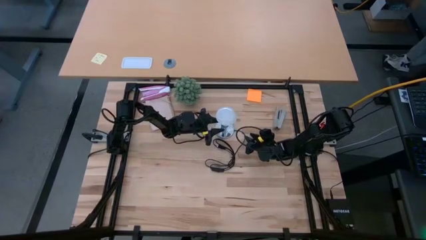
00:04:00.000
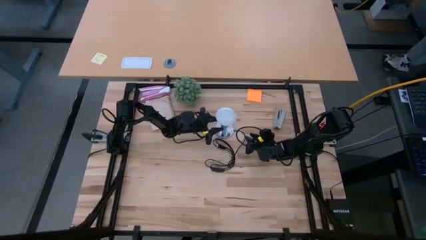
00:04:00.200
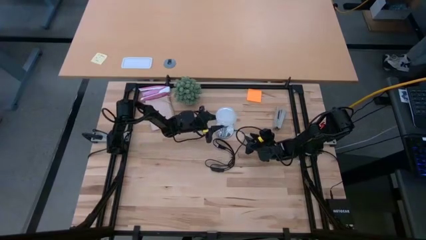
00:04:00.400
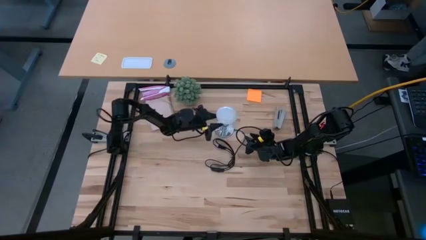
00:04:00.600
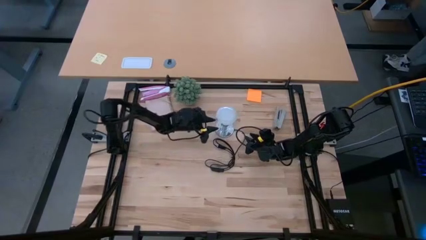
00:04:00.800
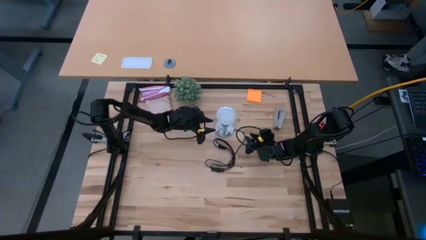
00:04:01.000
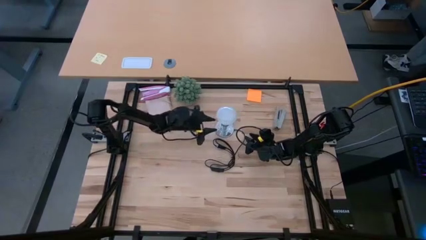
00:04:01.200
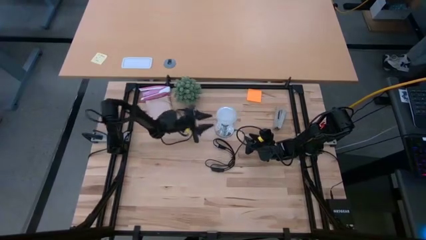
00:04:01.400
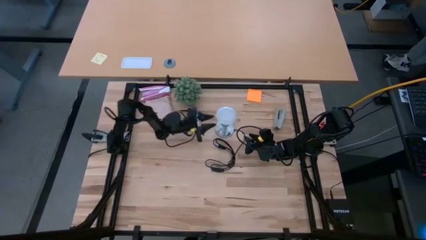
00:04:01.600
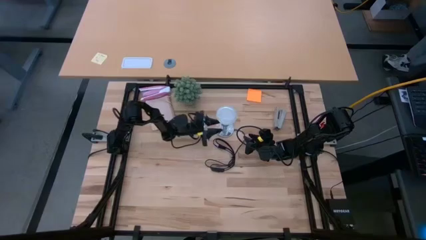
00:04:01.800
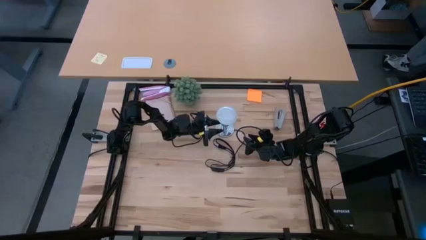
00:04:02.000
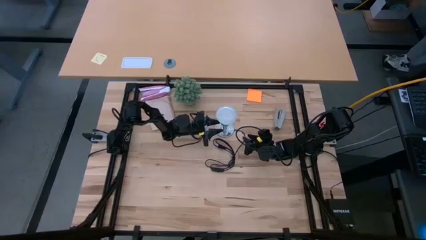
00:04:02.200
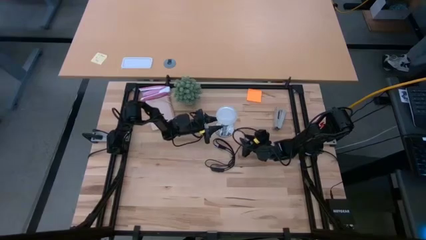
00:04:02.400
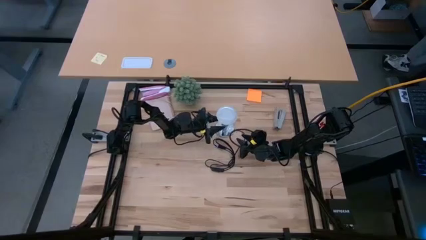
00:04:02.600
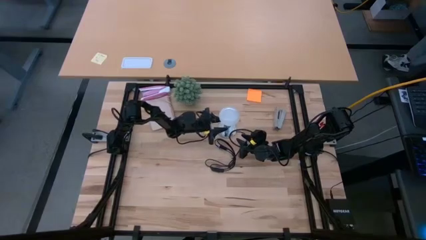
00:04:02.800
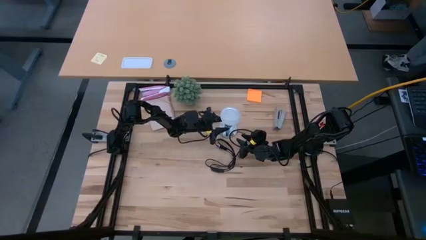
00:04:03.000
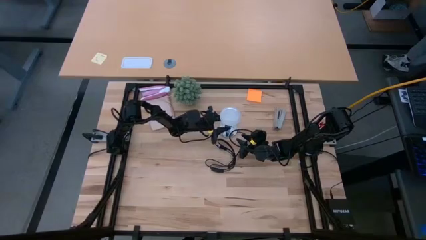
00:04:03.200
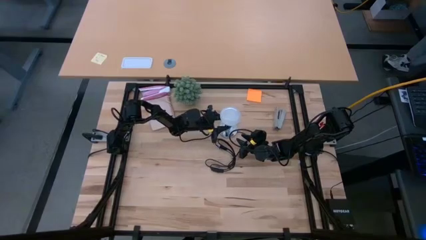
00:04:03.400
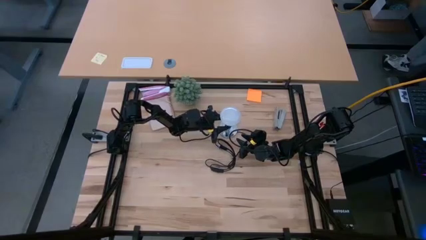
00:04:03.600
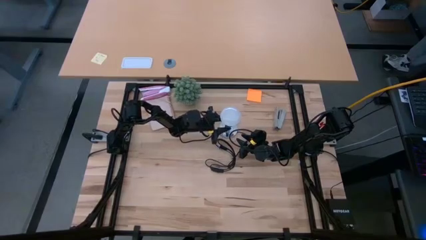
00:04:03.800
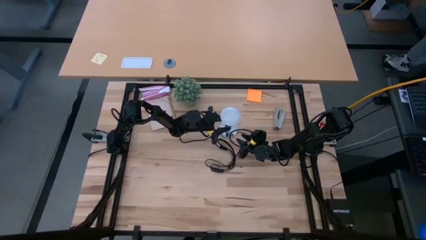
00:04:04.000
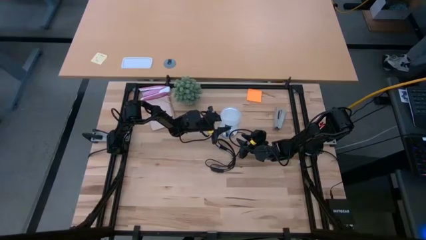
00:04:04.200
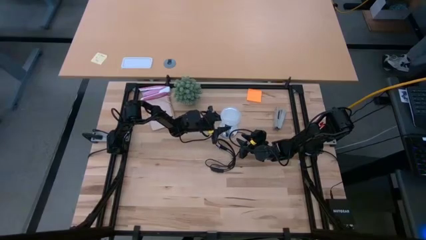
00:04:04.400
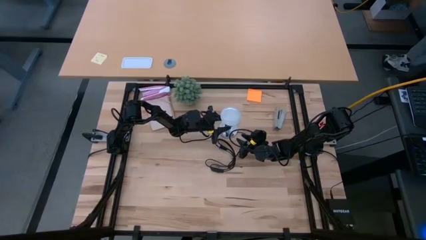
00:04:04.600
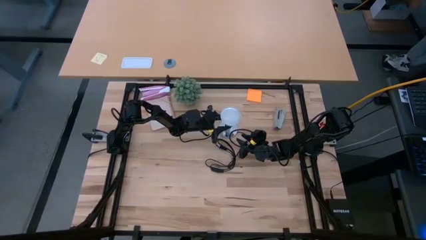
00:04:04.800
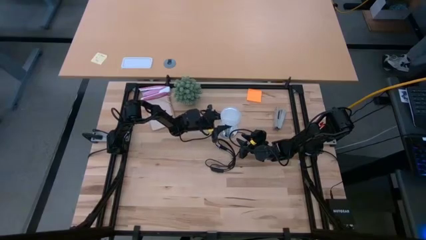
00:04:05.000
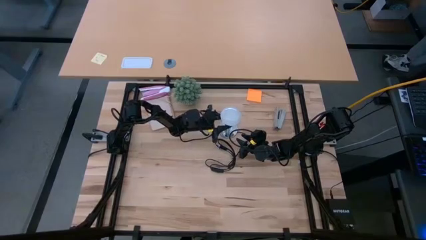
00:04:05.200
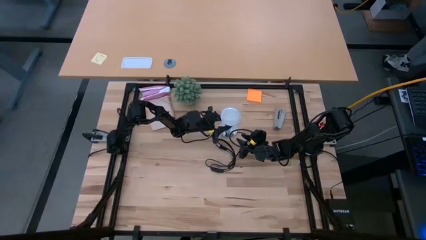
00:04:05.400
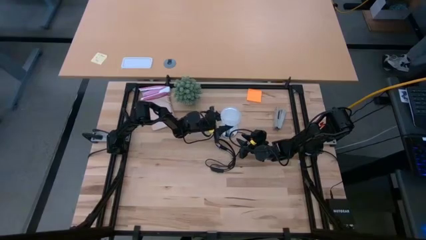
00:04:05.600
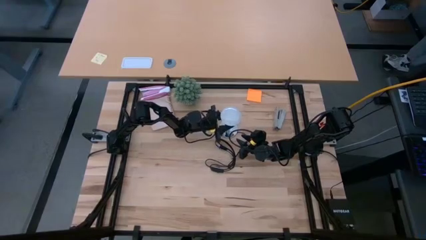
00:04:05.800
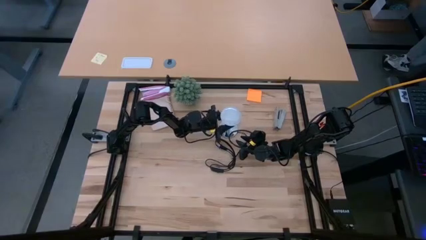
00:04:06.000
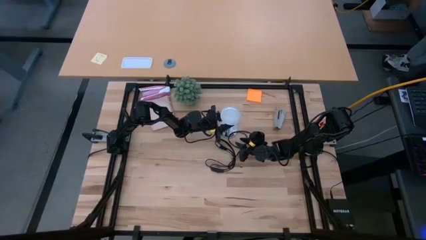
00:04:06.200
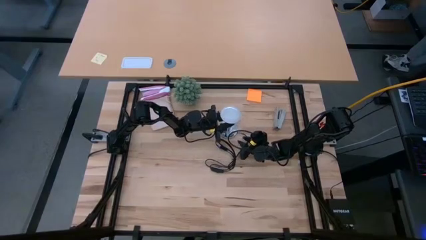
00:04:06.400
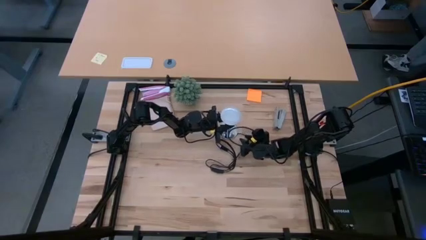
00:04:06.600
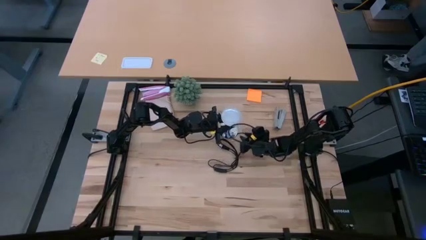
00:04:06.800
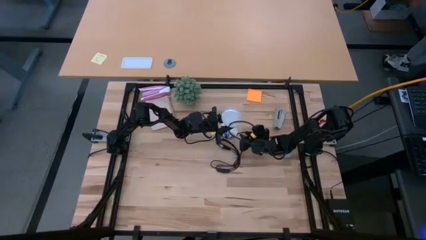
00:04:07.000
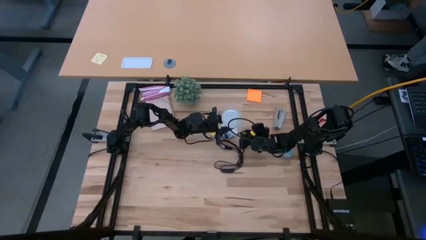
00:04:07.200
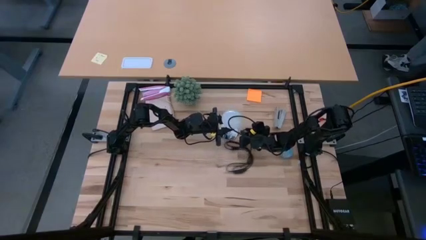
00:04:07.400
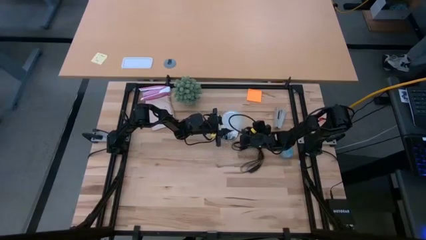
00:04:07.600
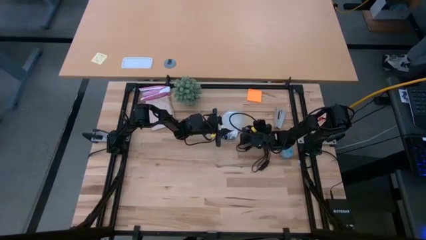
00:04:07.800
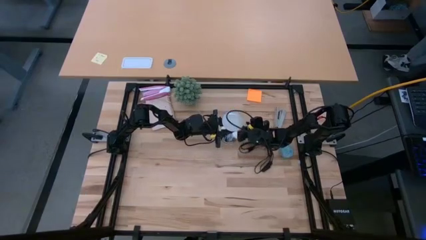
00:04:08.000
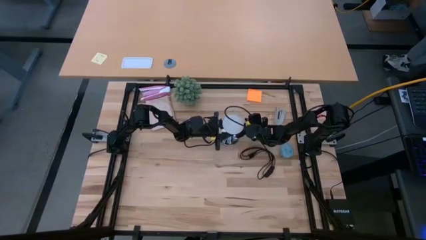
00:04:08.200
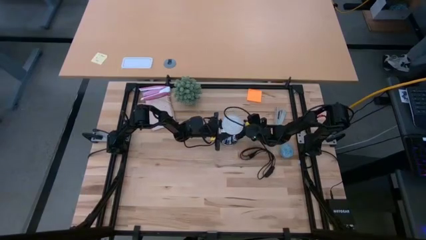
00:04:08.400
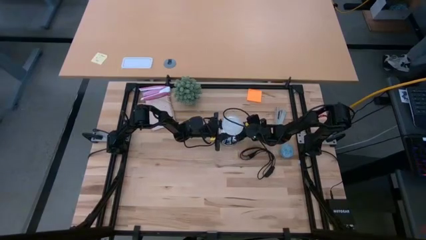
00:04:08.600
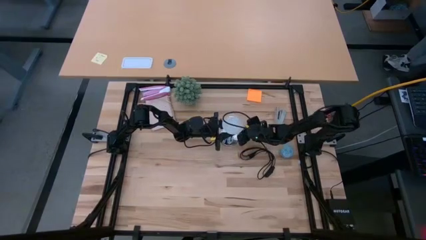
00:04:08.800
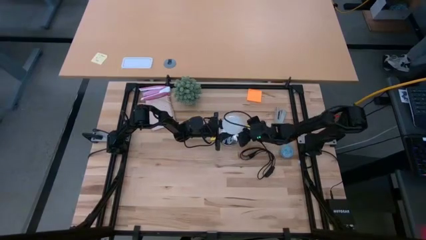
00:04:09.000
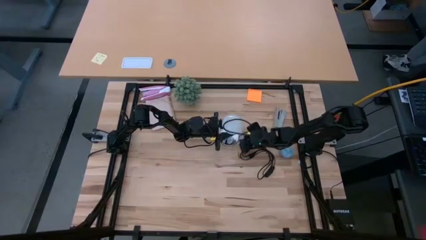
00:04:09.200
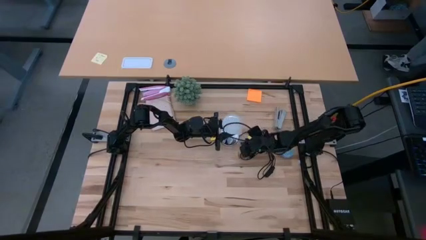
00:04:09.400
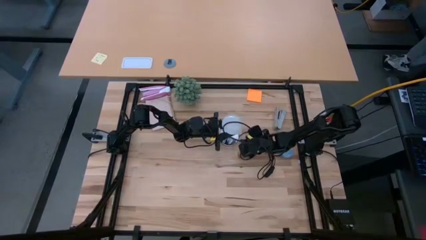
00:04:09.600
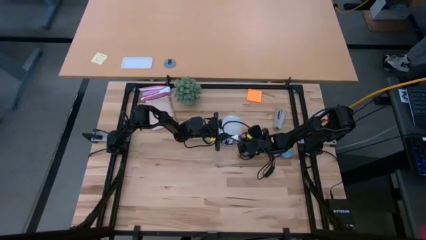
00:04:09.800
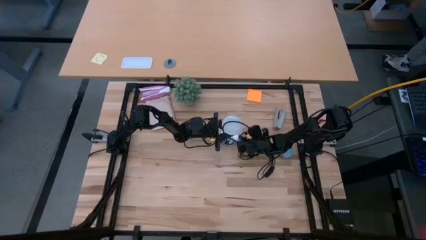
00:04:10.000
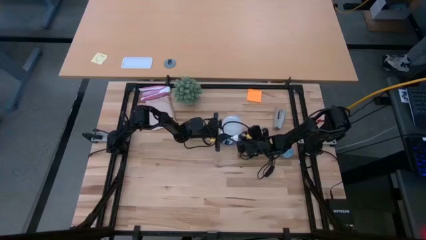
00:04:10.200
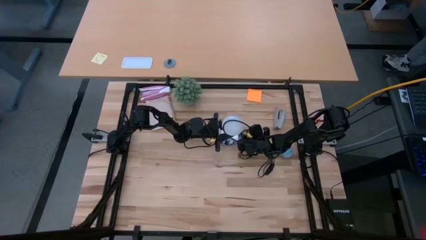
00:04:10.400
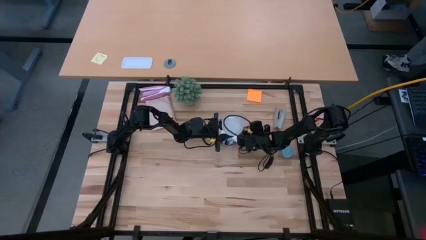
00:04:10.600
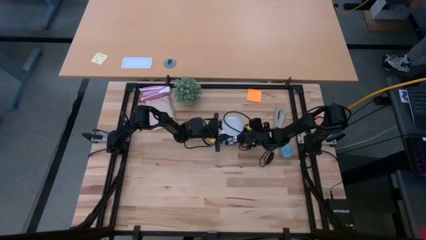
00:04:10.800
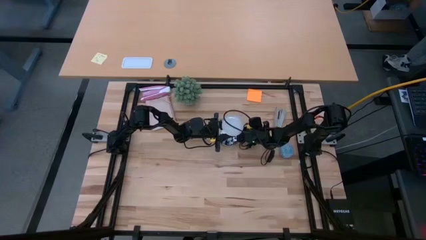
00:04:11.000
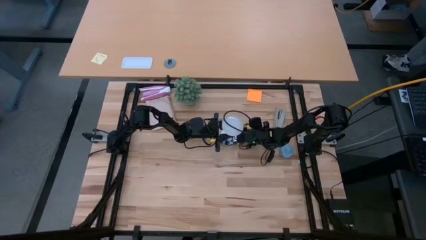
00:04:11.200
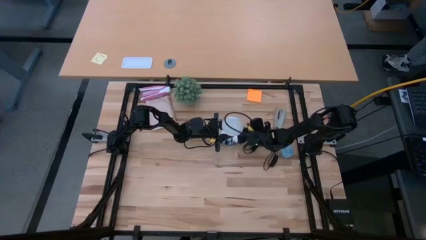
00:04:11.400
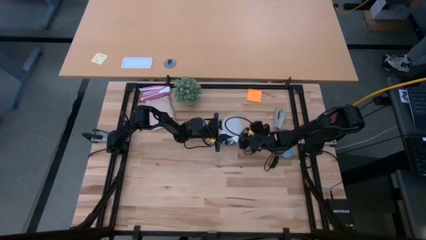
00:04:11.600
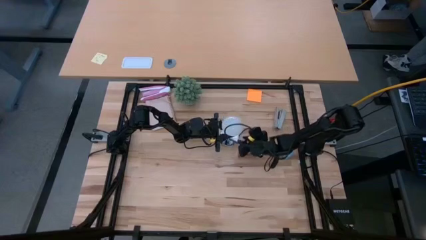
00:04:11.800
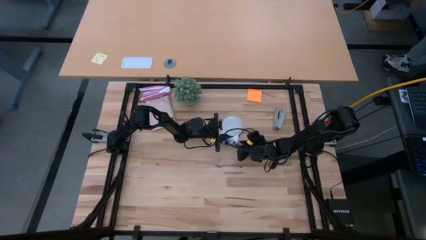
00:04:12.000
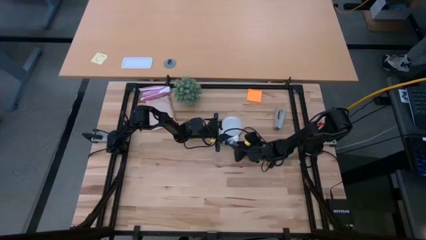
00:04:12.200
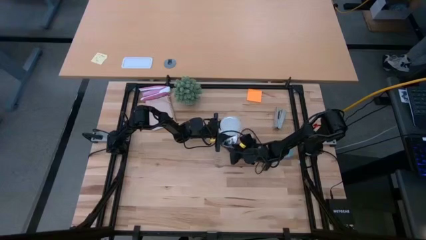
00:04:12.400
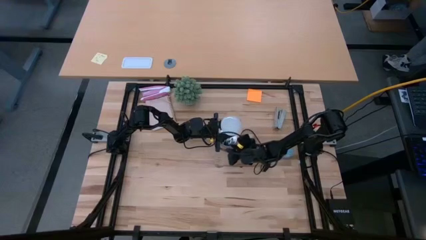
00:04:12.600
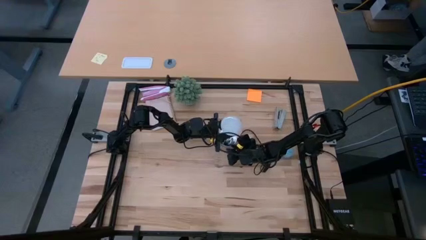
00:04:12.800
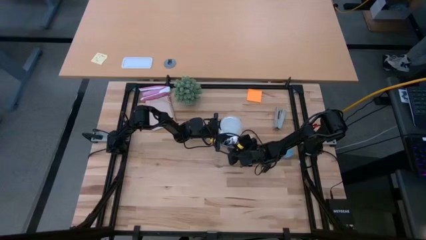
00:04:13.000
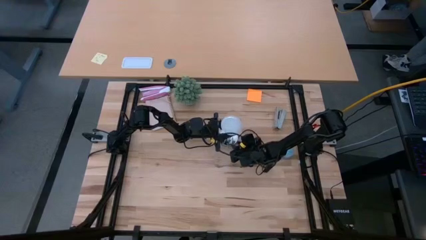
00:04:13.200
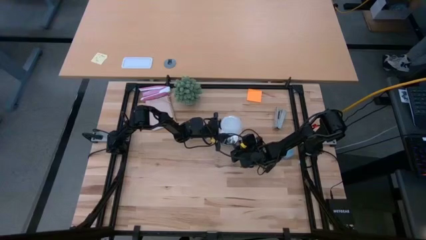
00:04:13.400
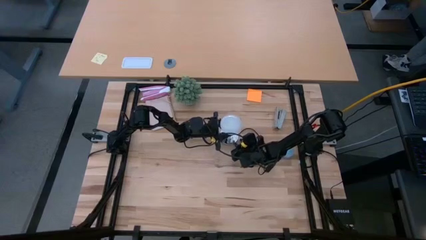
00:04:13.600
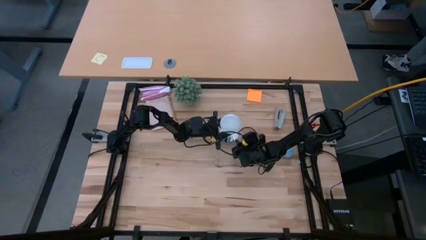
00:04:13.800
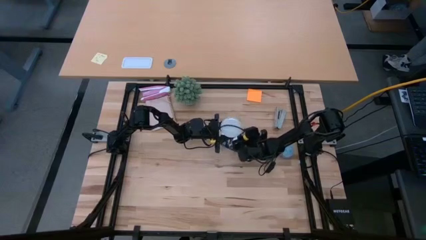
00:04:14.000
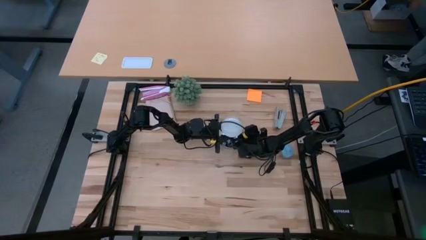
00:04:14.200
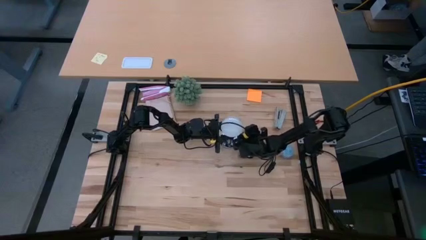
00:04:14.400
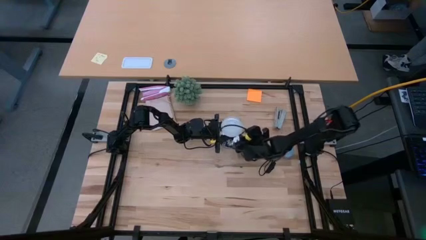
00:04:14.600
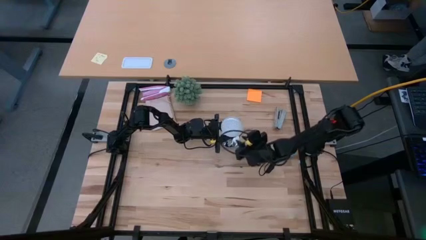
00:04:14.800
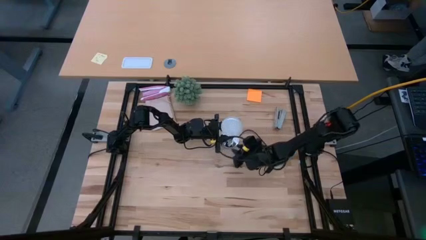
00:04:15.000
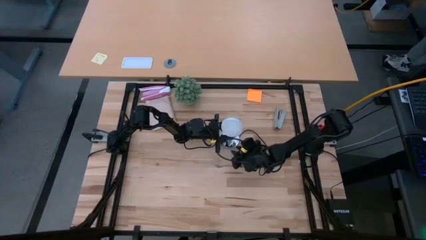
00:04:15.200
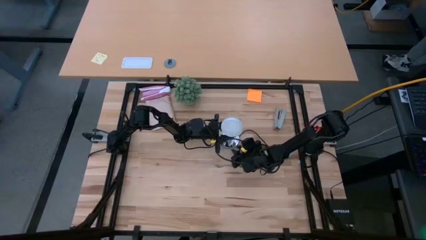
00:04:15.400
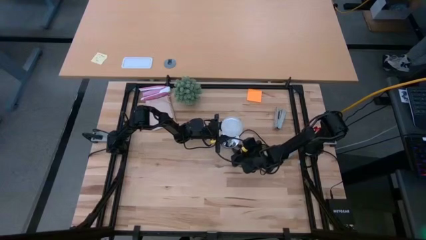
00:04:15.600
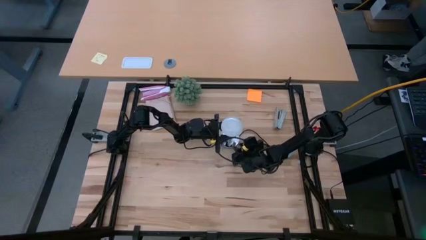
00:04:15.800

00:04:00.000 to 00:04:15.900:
Task: Screw lightbulb
Remove the lightbulb from the lamp

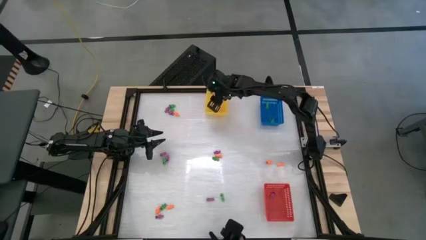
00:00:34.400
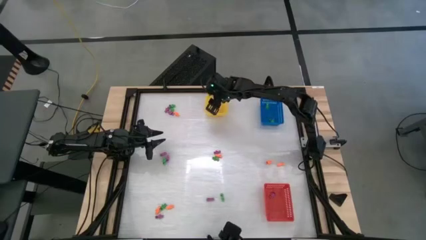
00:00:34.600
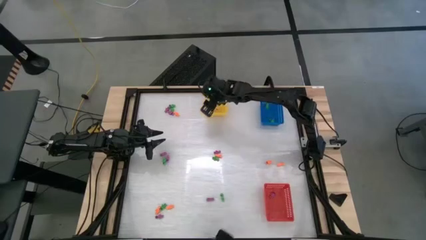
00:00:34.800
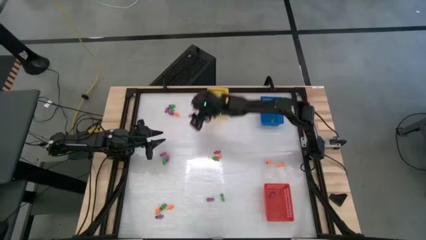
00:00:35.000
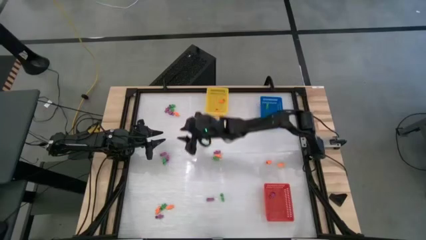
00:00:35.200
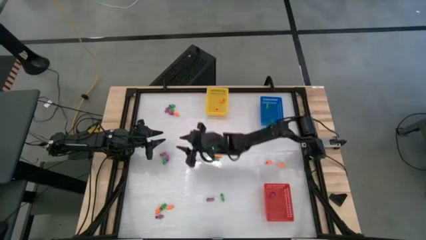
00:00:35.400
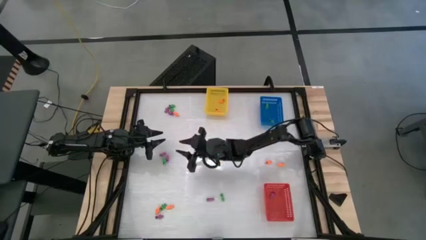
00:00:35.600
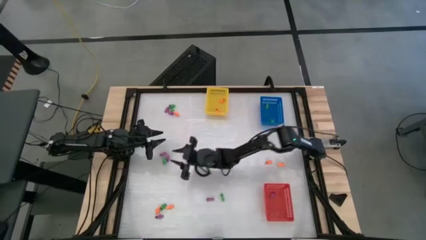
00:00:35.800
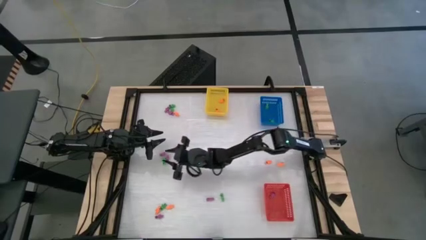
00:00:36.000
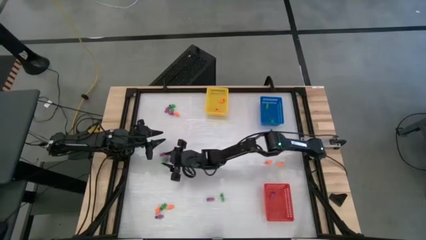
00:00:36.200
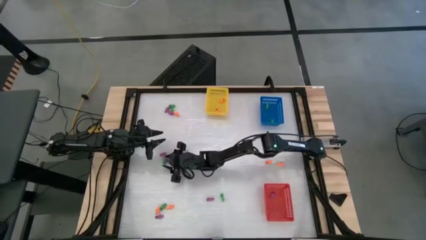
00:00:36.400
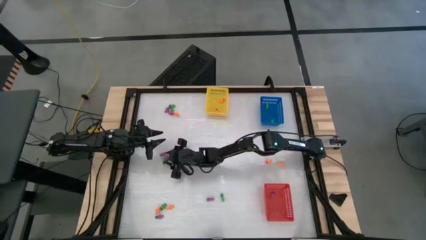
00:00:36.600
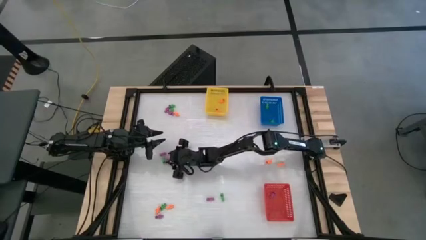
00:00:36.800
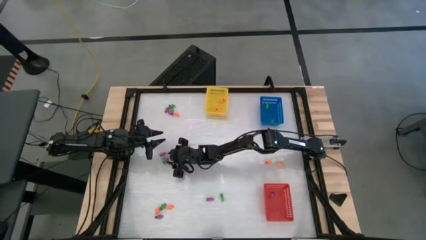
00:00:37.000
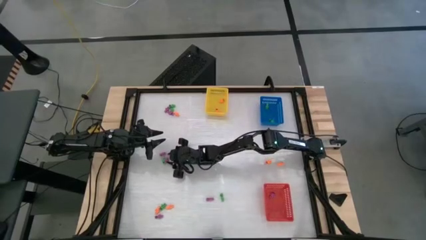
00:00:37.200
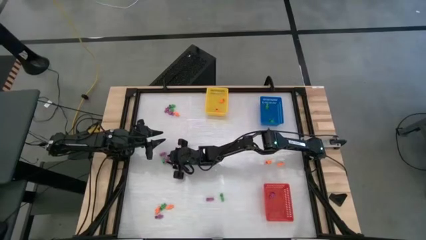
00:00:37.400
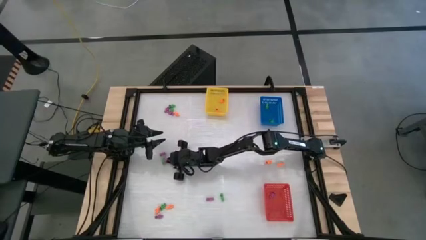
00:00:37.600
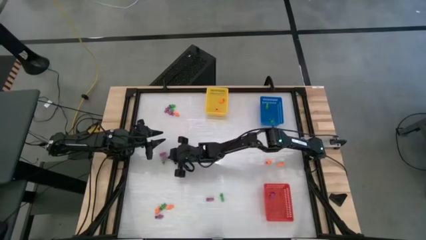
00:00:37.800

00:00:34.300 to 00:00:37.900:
Task: Sort Halloween decoration
Put the violet skeleton toy into the red bin
